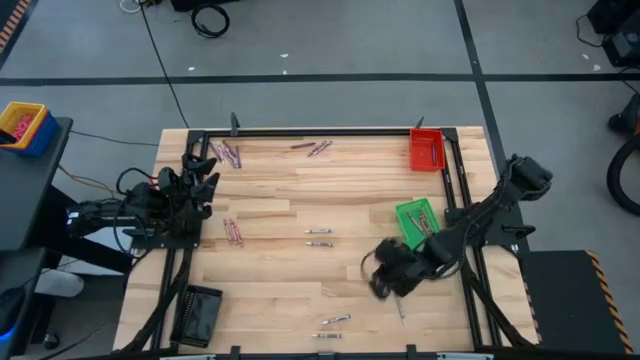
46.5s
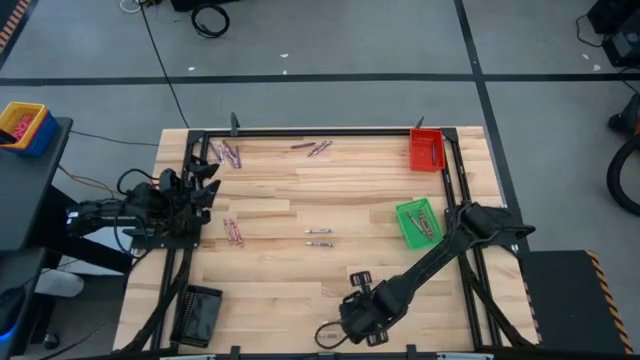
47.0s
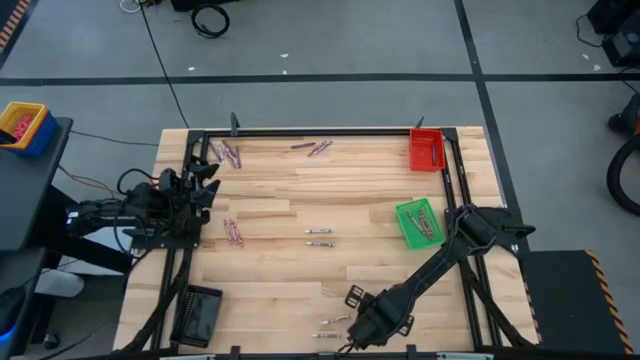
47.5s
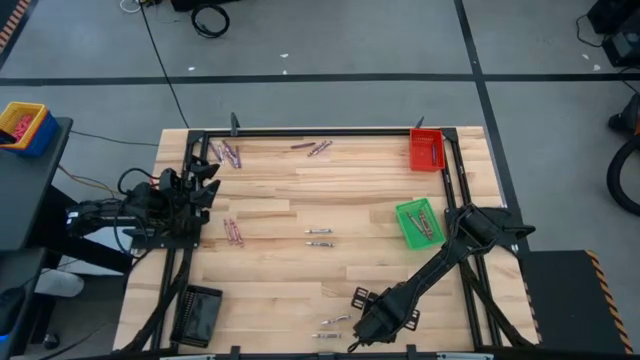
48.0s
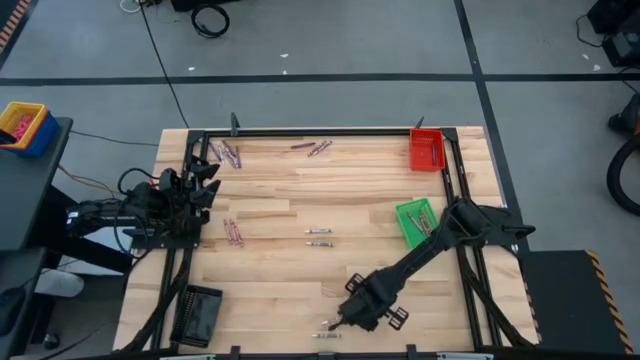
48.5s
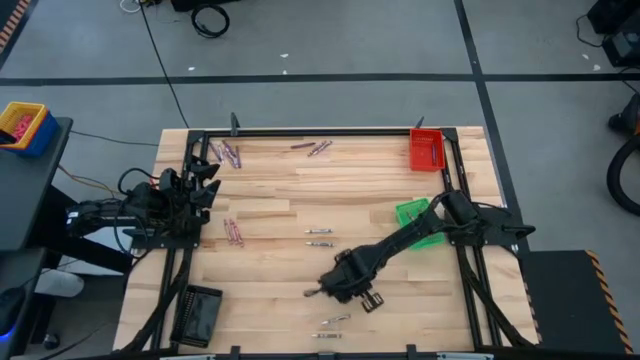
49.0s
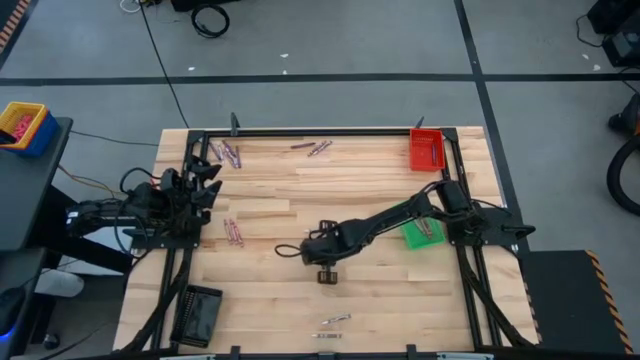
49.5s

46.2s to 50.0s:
Task: Sort crayons
Move the white crayon to the center of the table

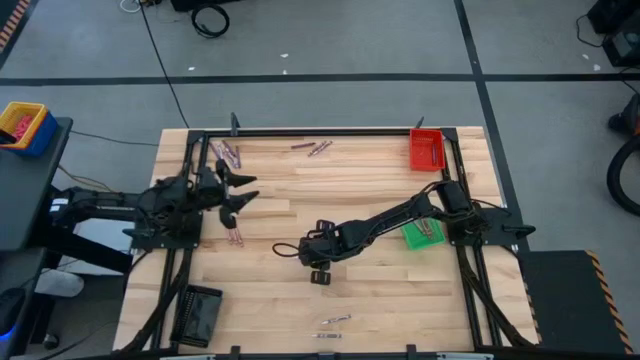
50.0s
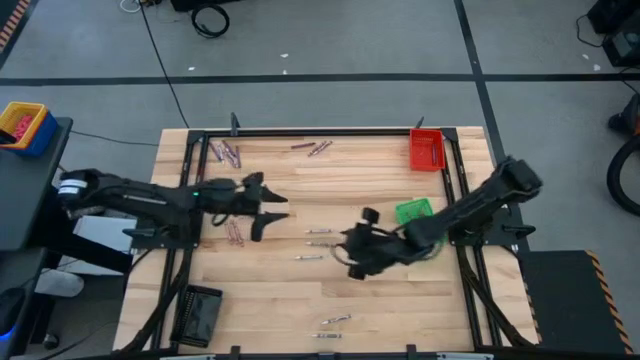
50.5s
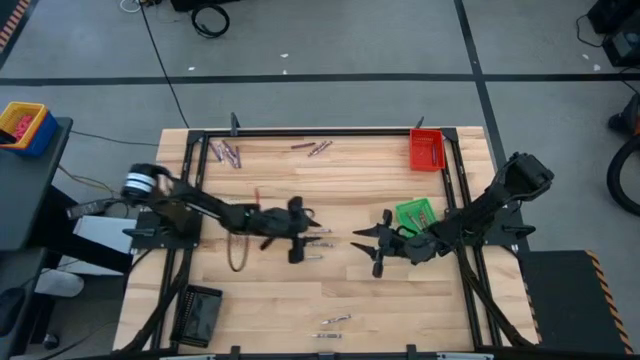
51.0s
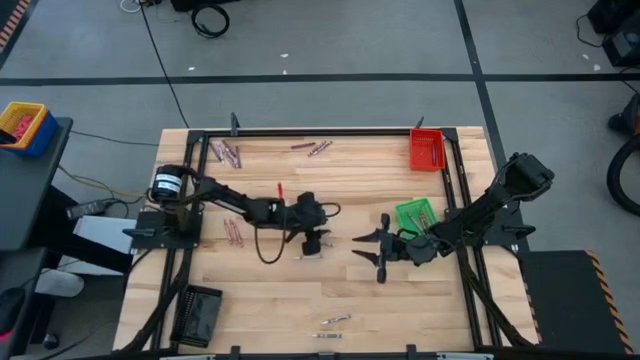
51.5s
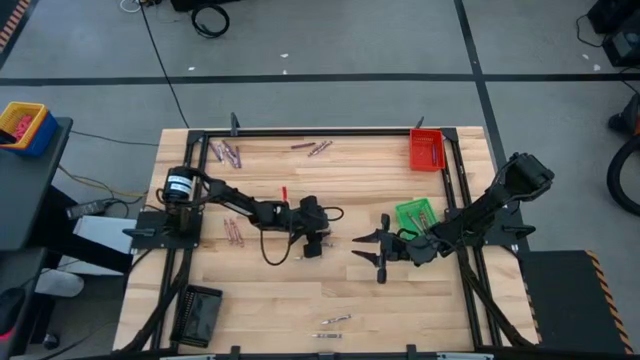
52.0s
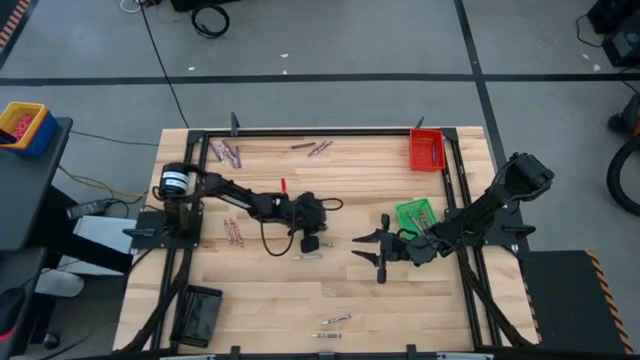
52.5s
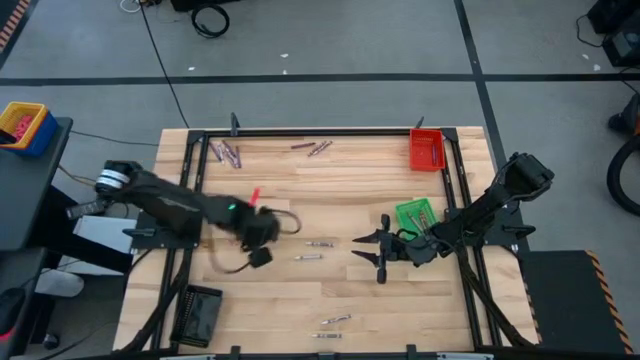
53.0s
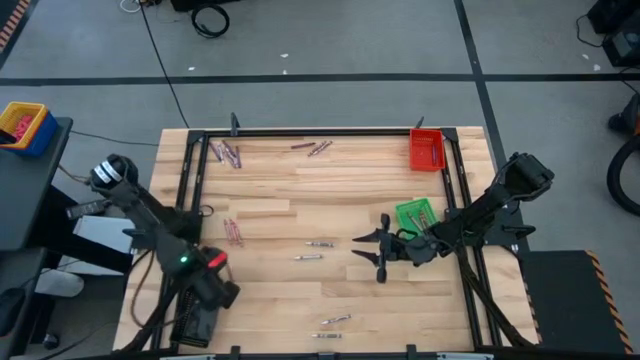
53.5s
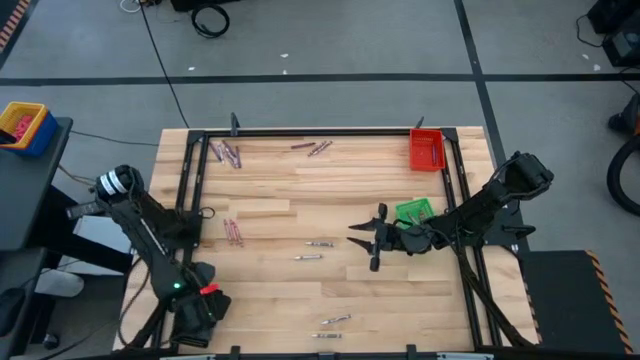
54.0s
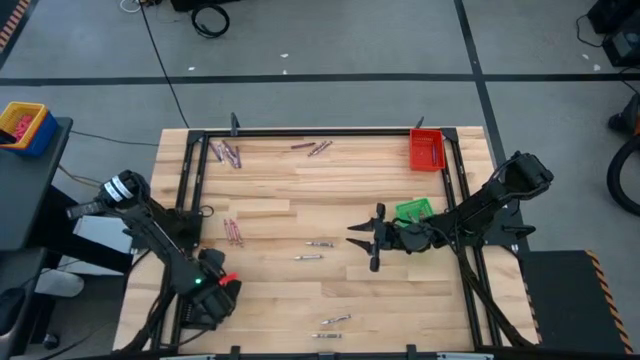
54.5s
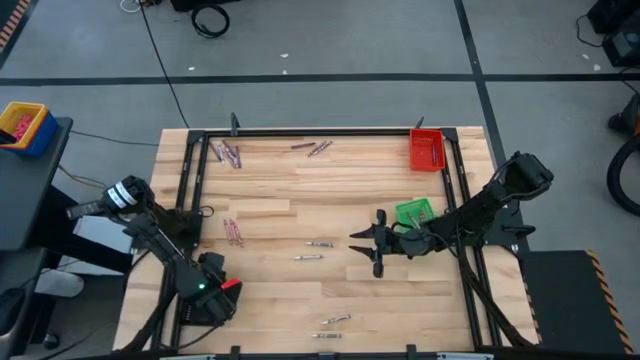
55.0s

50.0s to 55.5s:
Put the white crayon into the black bin

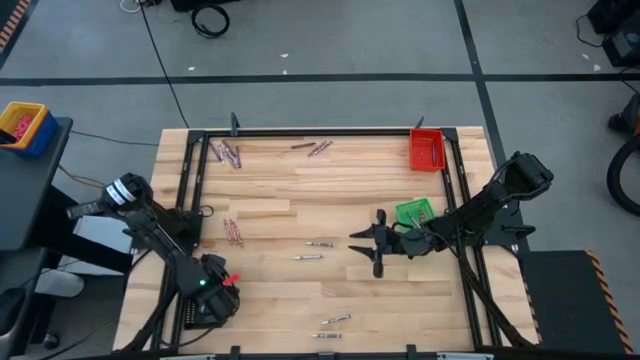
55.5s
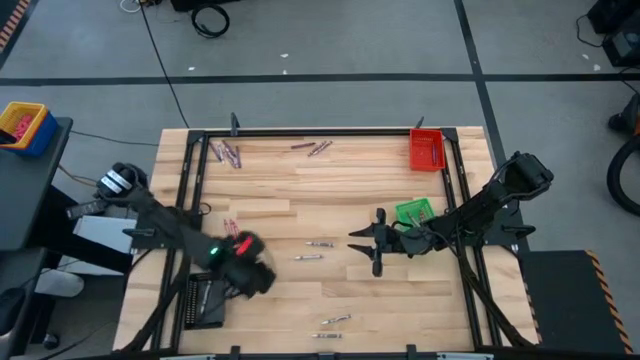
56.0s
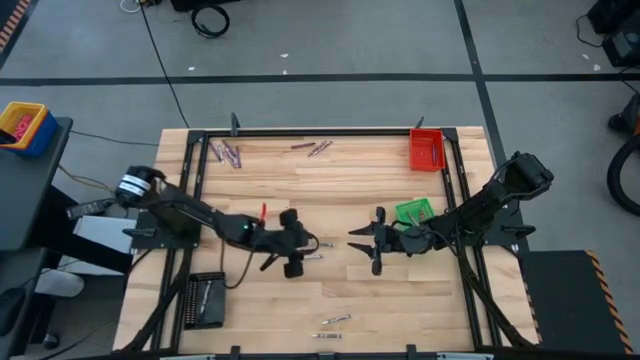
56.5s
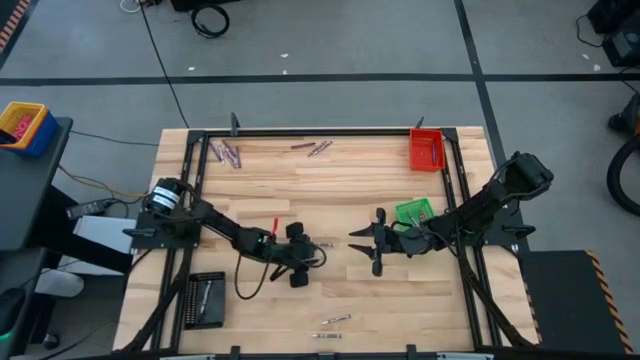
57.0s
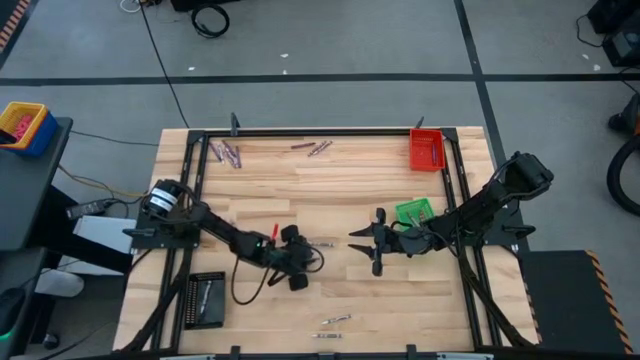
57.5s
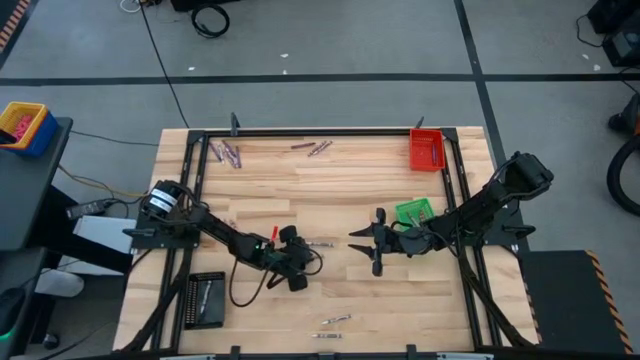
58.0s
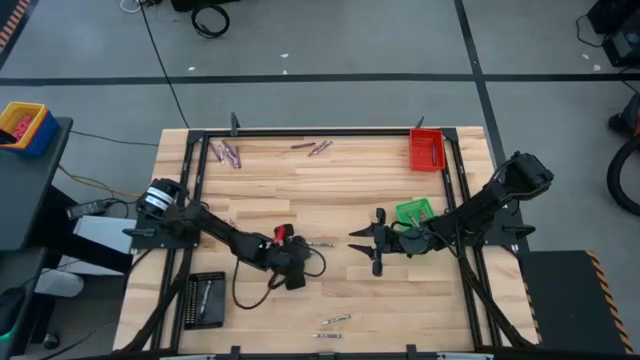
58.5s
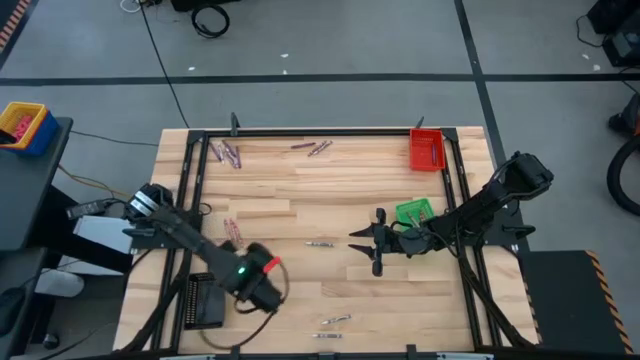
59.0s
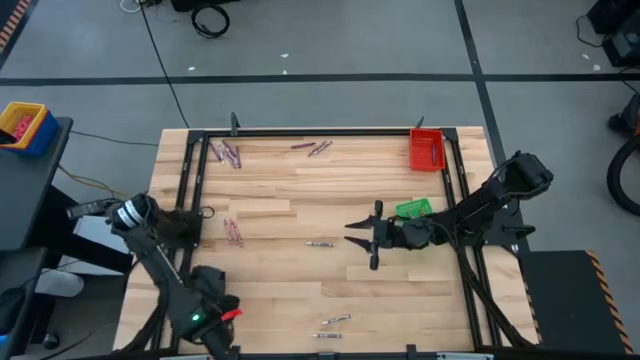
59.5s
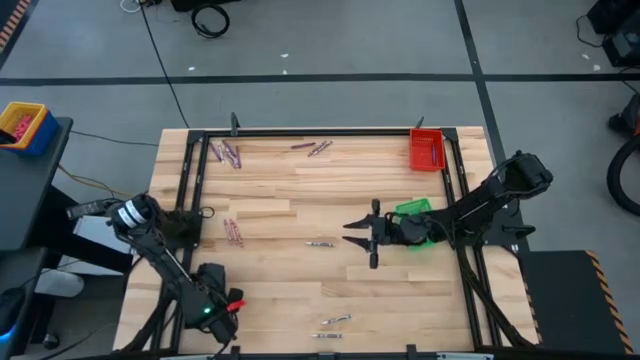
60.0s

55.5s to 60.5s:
Put the white crayon into the black bin

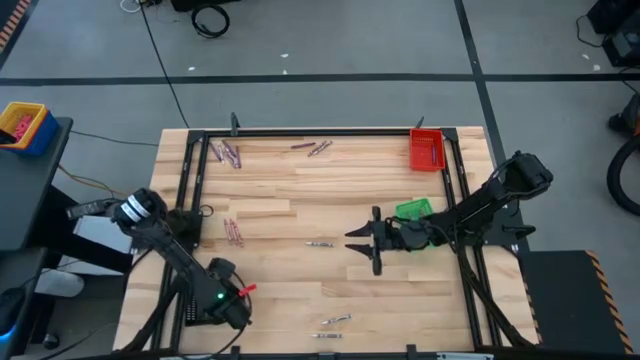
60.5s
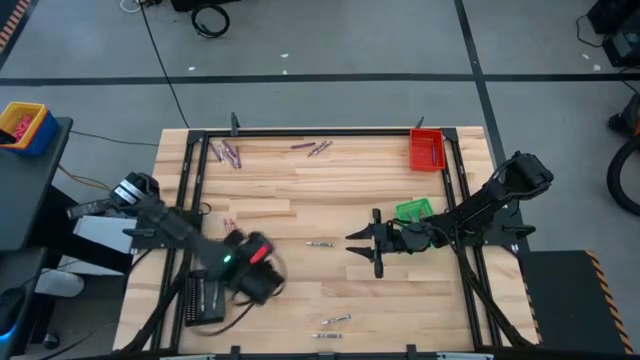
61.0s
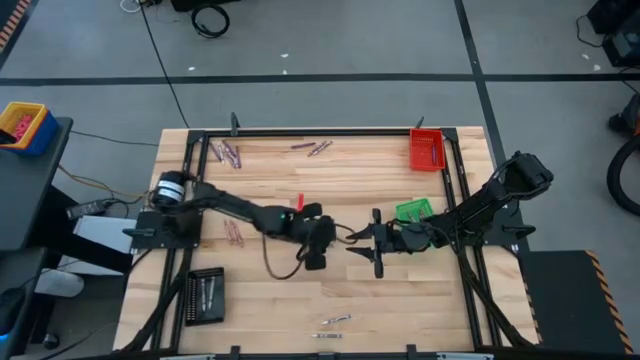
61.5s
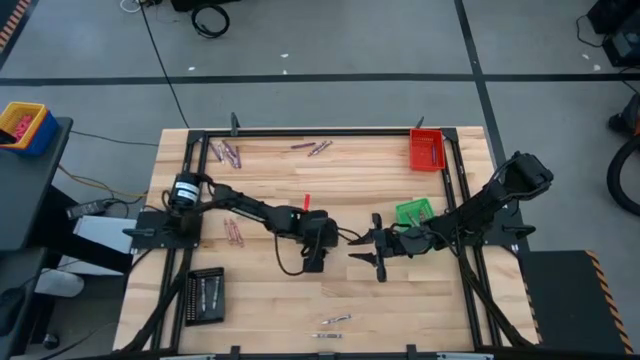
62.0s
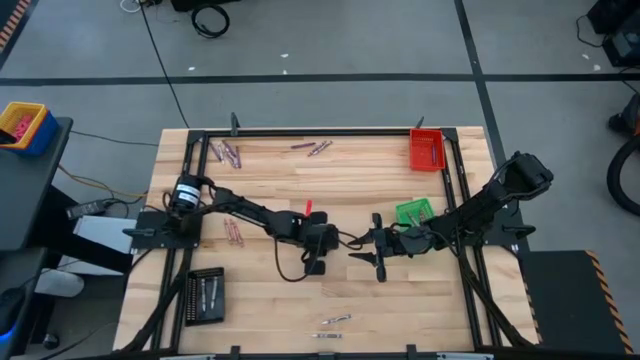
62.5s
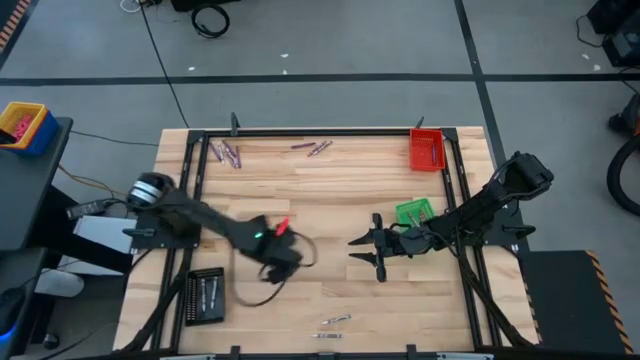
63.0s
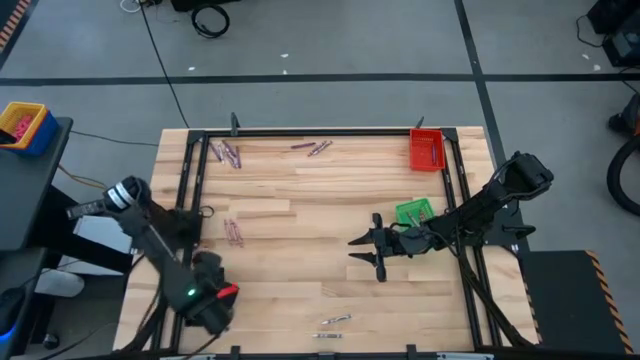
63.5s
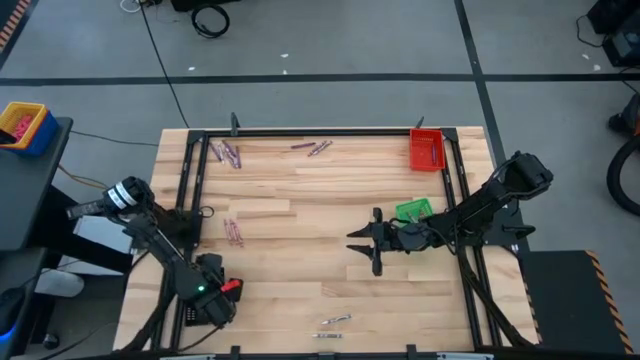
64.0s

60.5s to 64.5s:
Put the white crayon into the black bin

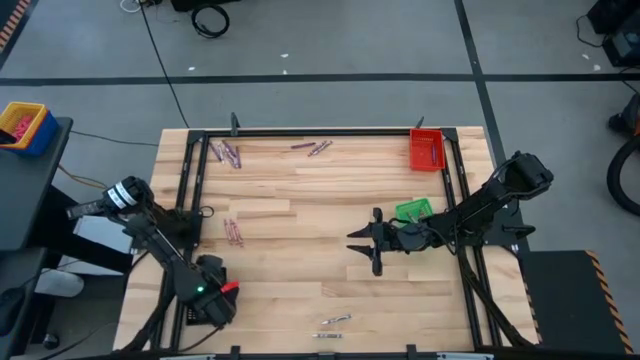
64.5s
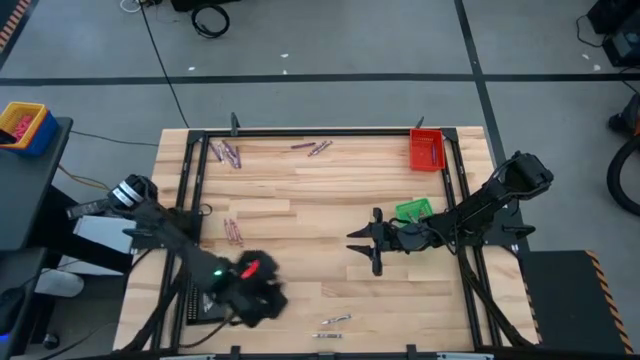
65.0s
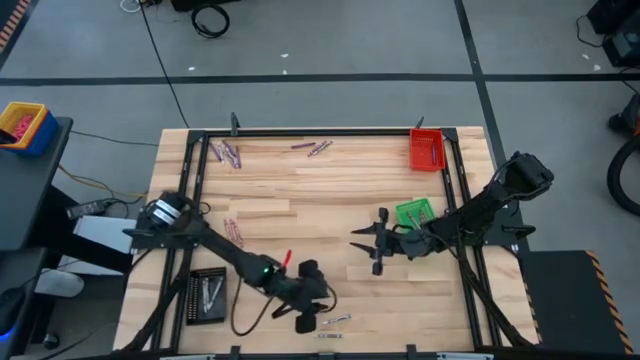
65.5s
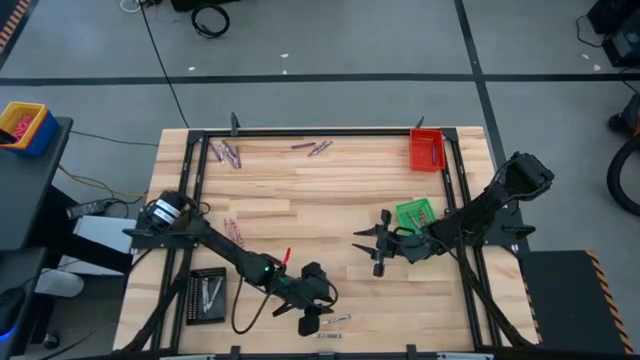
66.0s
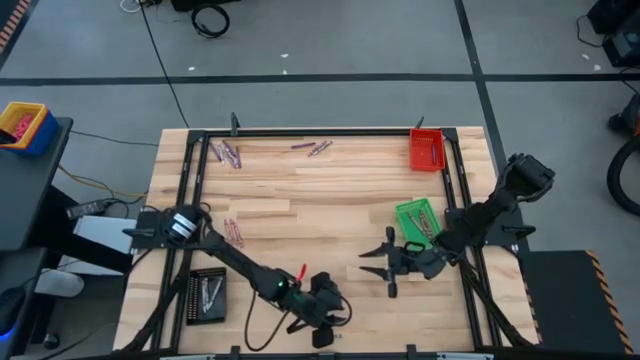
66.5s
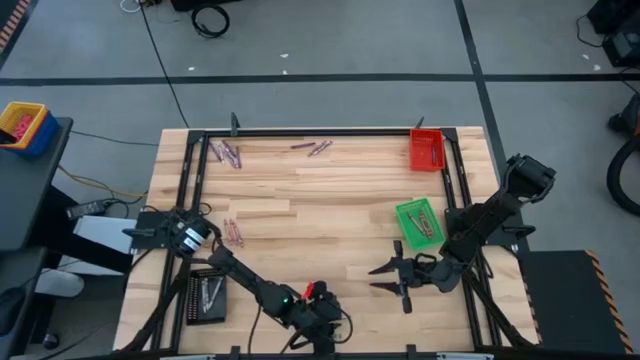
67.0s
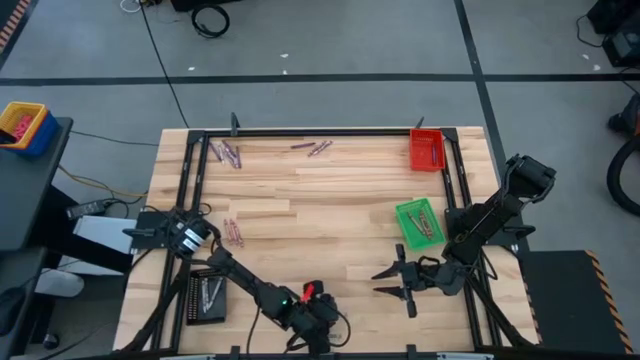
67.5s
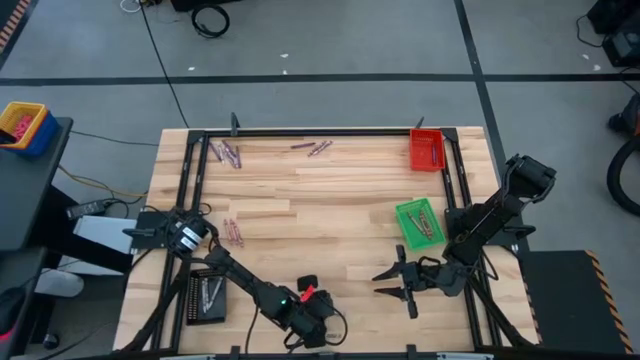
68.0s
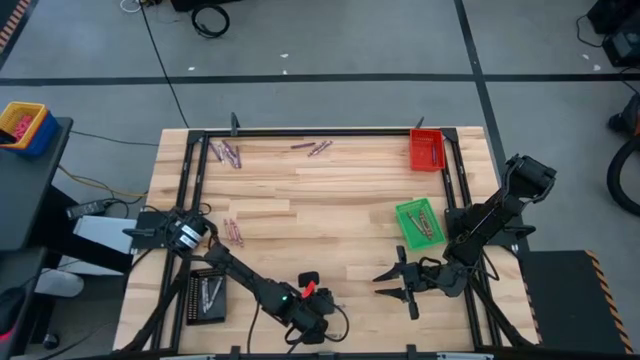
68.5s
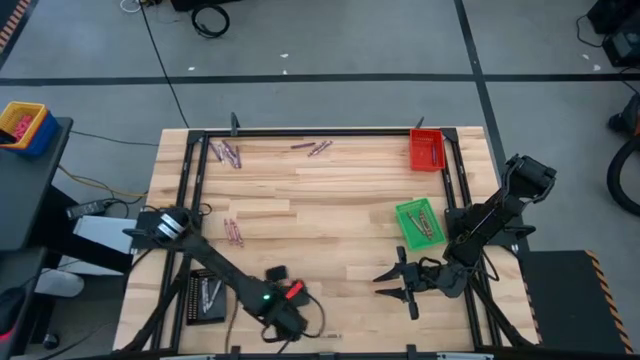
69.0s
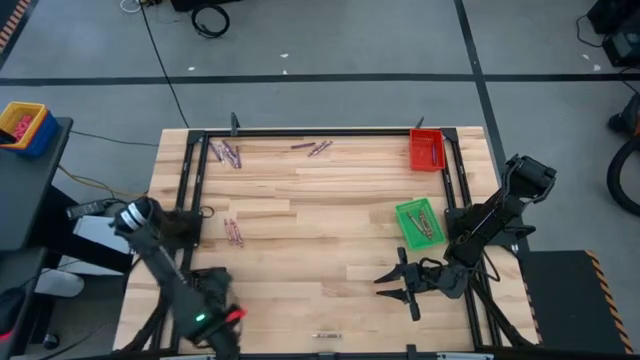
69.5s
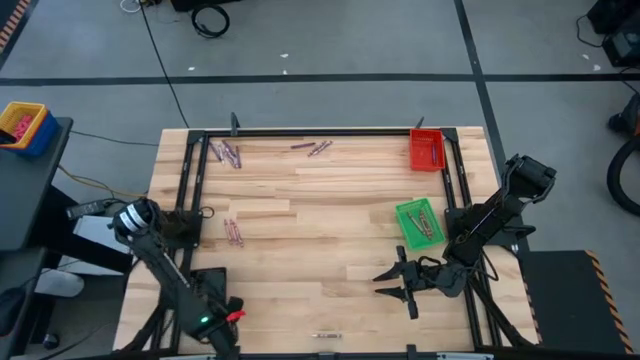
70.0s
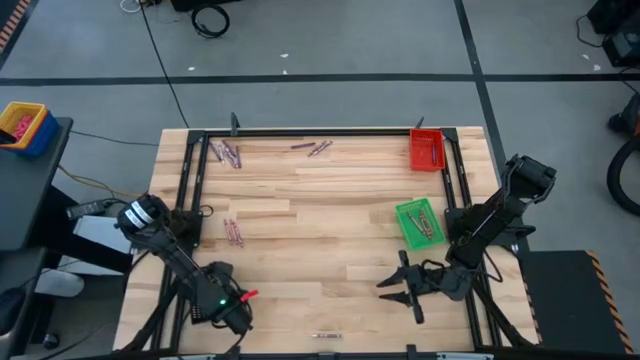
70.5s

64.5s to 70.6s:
Put the white crayon into the black bin
